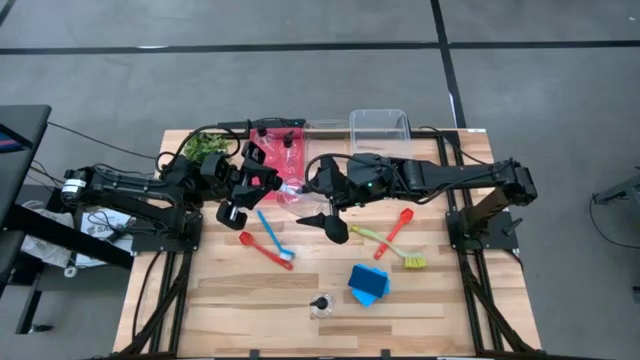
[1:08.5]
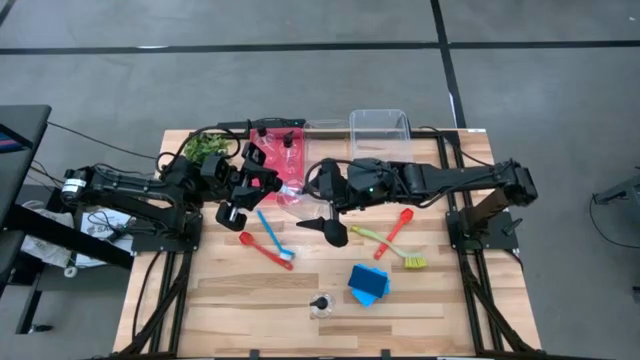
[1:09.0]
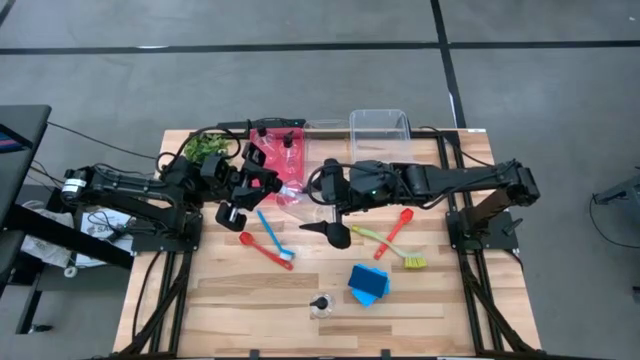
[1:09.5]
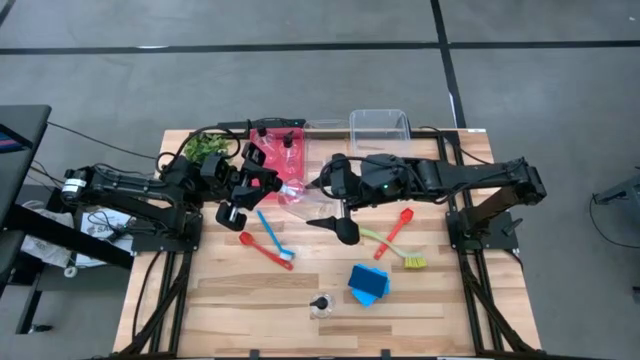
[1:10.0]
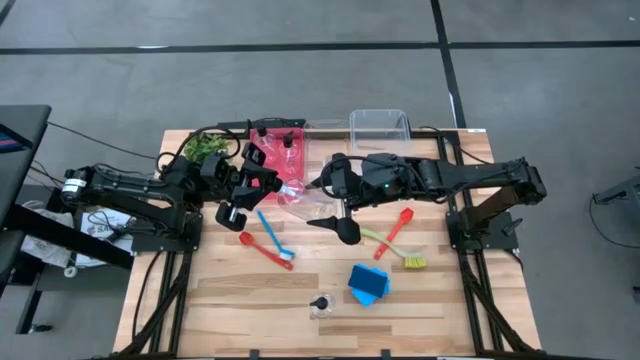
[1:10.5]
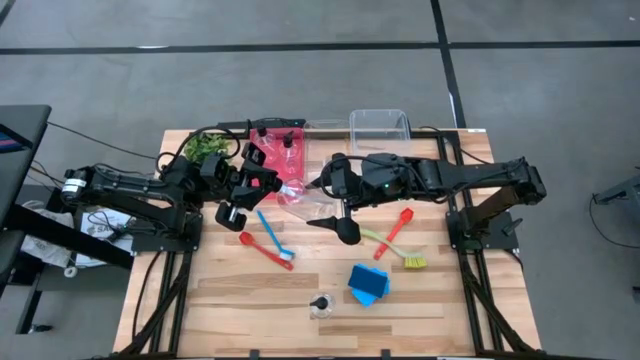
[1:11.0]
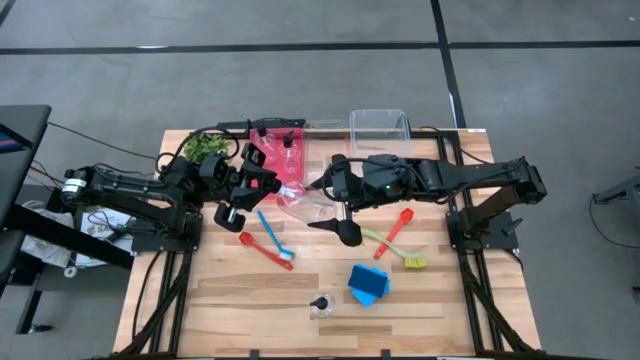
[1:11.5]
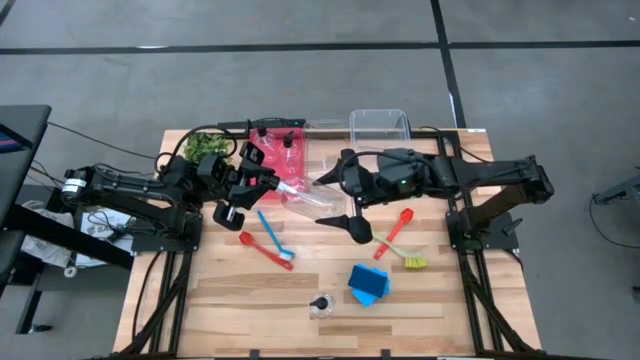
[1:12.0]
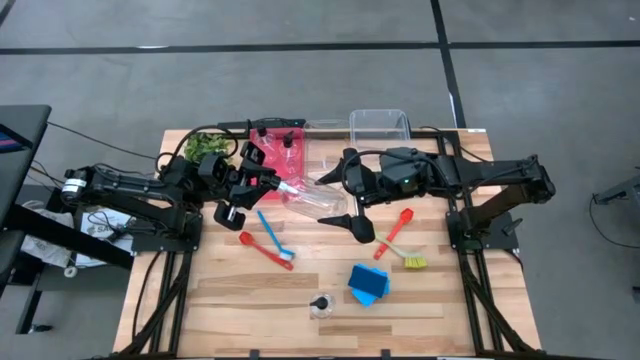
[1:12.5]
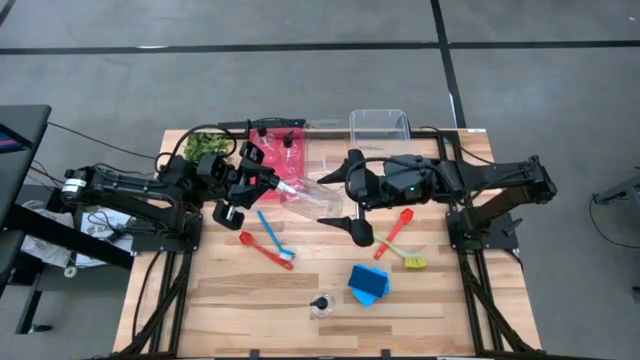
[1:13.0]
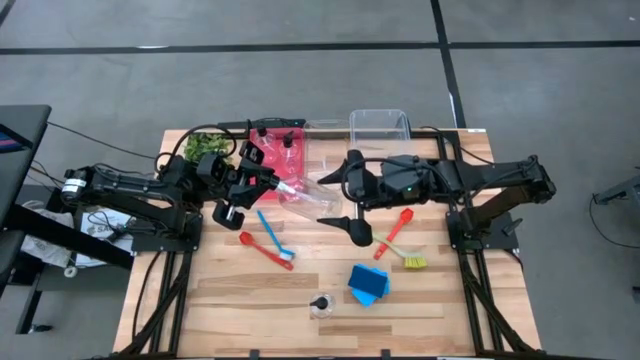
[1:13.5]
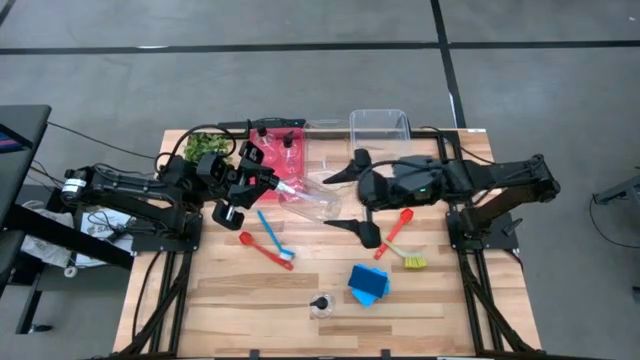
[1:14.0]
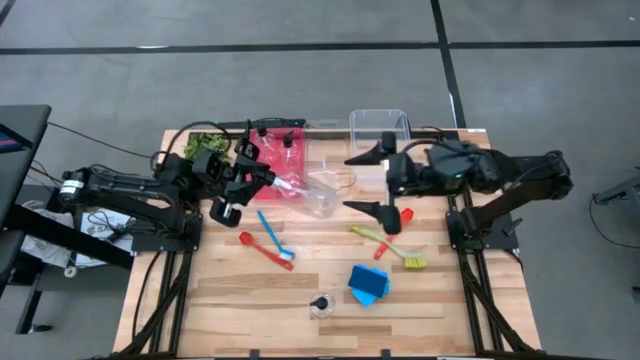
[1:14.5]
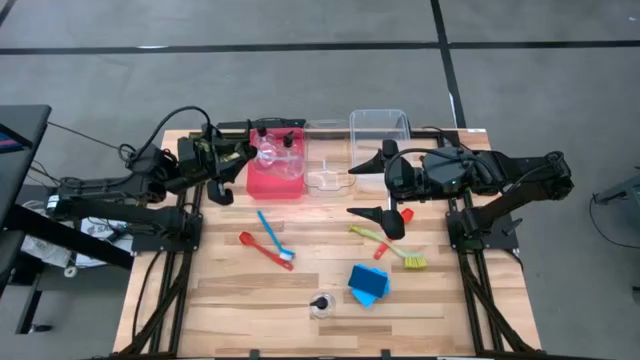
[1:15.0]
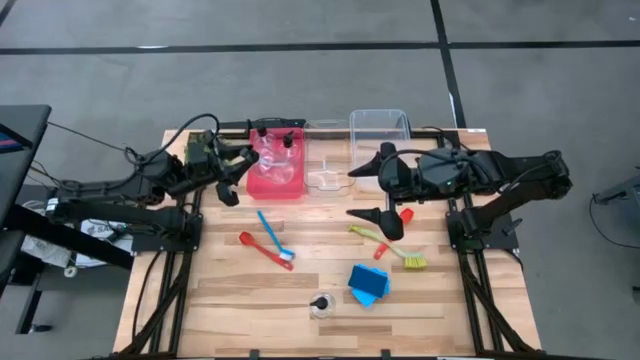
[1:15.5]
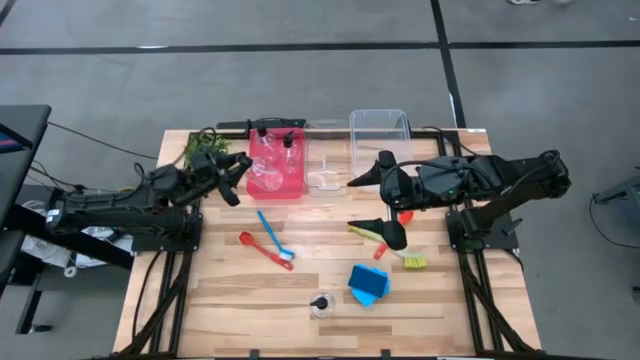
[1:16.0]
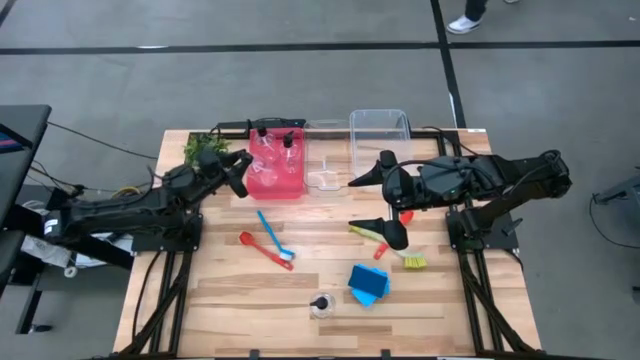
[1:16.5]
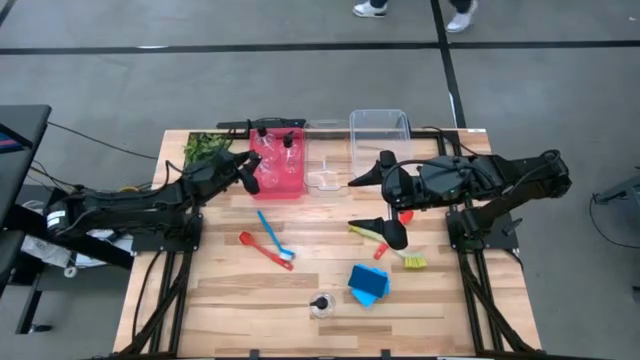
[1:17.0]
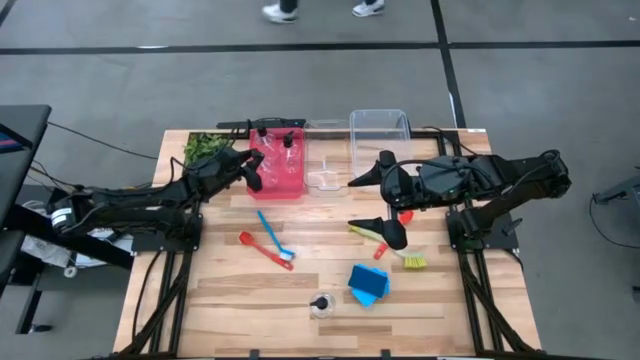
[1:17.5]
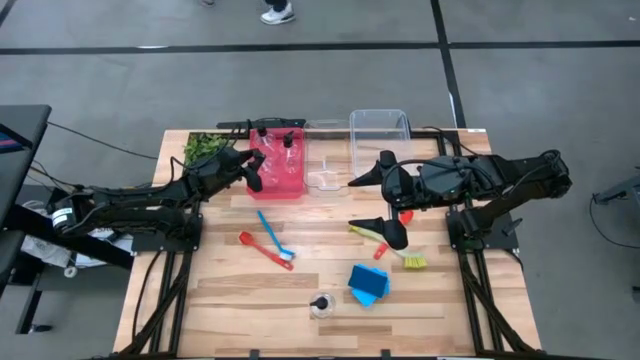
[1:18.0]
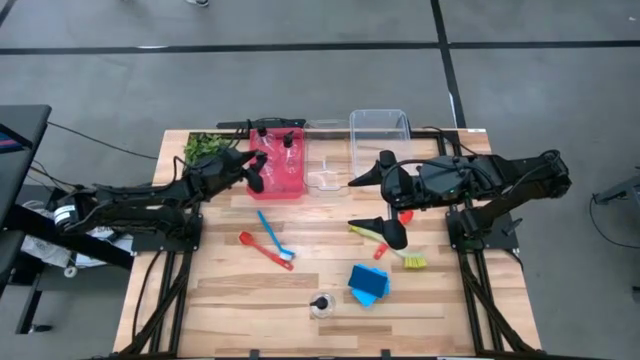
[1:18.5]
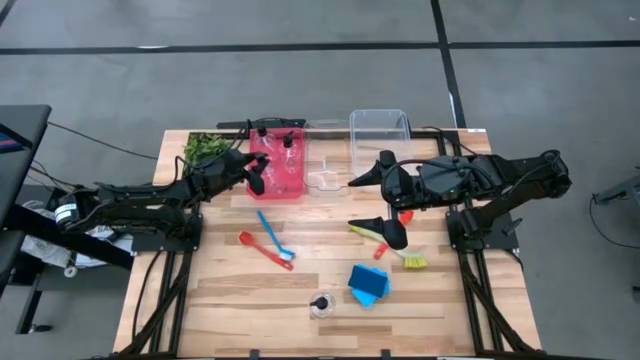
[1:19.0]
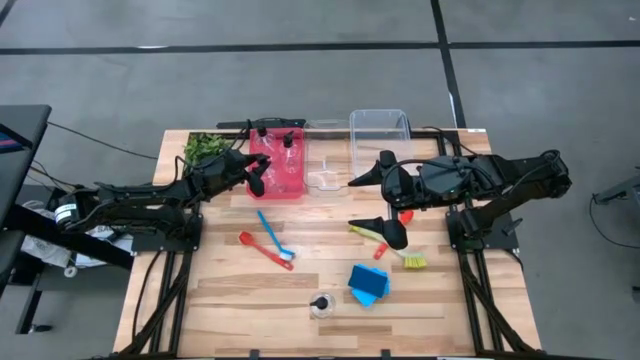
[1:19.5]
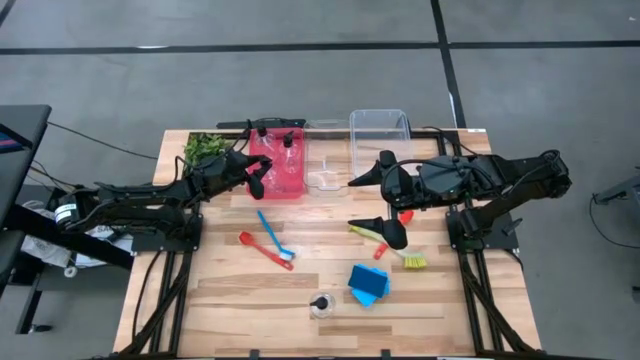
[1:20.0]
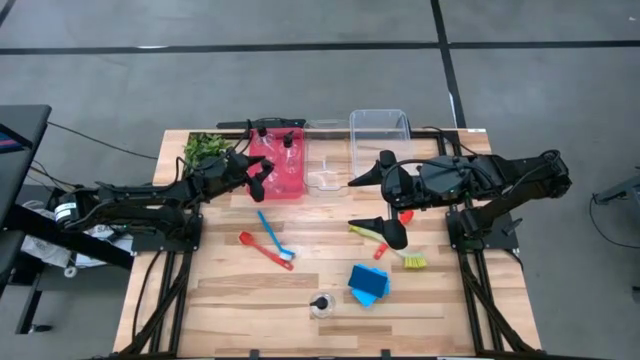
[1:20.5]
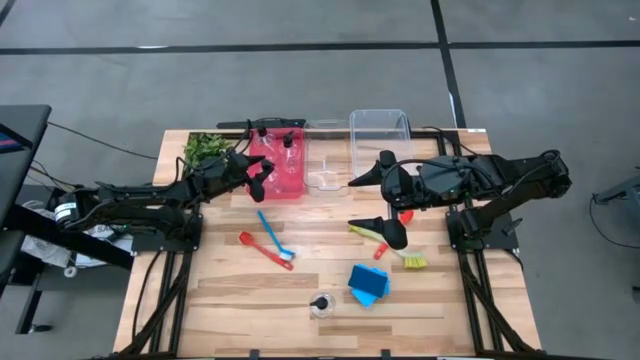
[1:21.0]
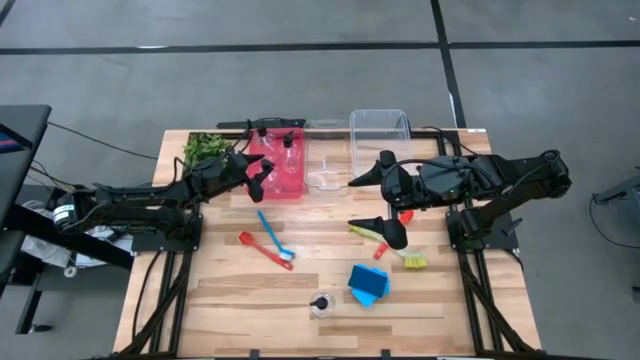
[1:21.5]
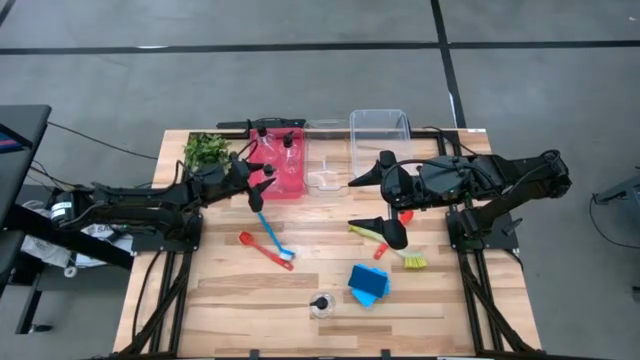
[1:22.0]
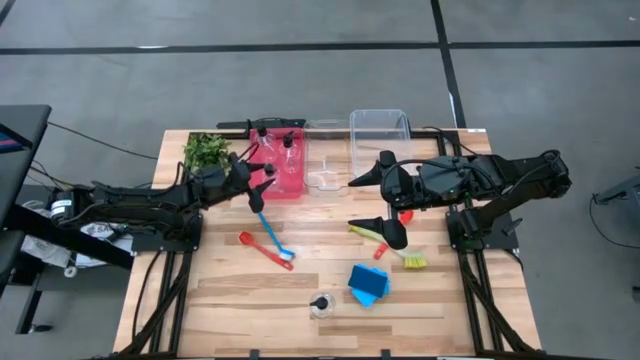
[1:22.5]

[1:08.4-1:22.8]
Task: Pick & Place Kitchen Sink Supplies
Put the spray bottle into the pink bin

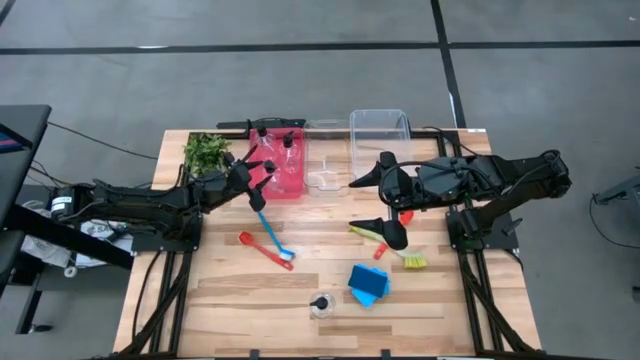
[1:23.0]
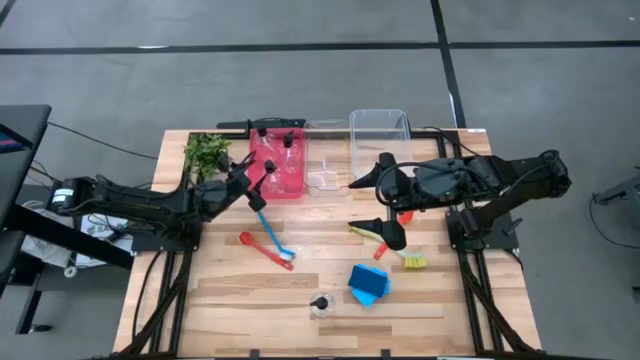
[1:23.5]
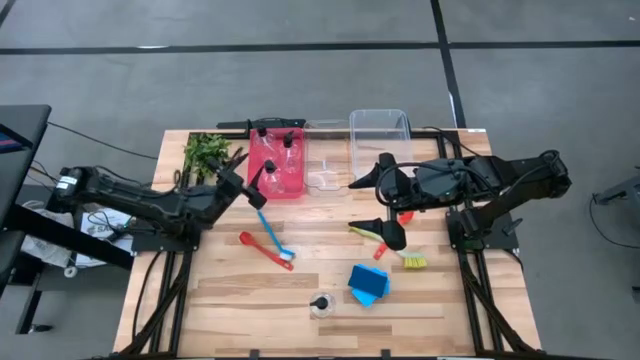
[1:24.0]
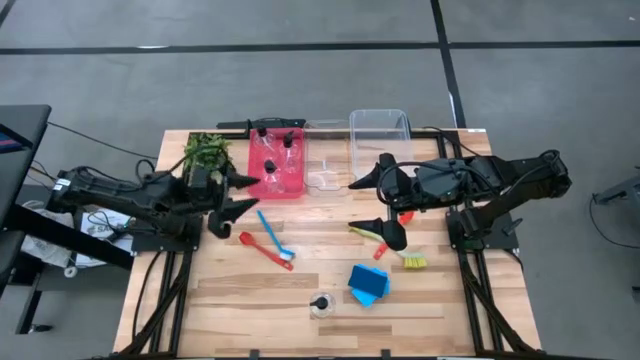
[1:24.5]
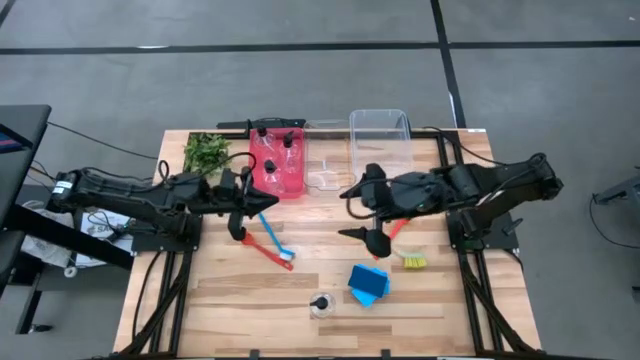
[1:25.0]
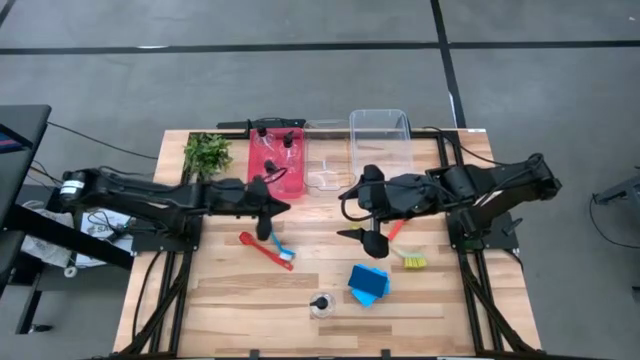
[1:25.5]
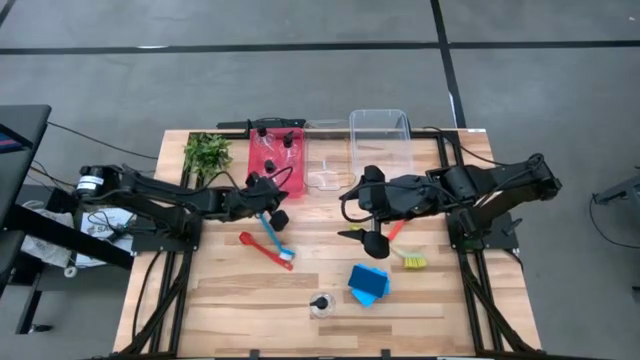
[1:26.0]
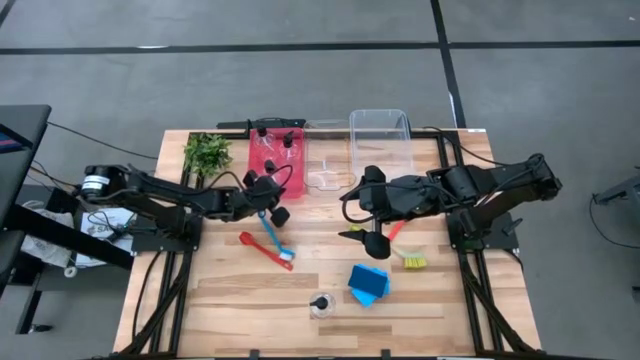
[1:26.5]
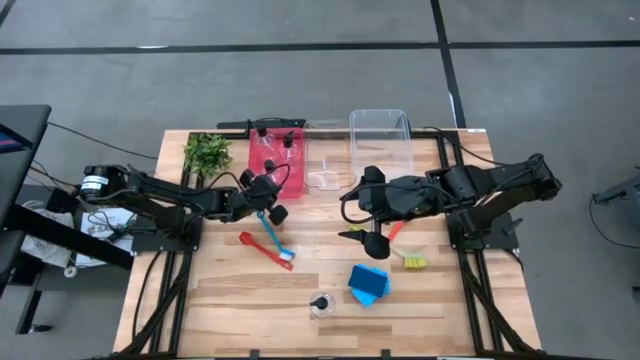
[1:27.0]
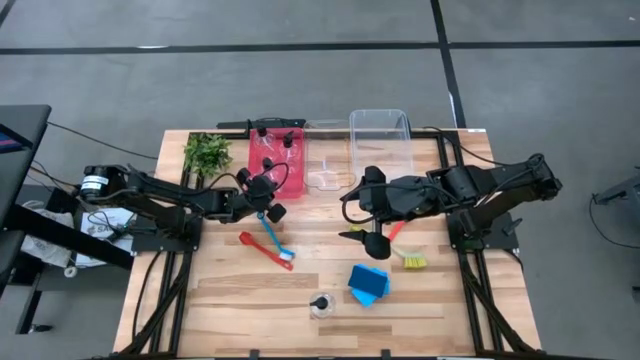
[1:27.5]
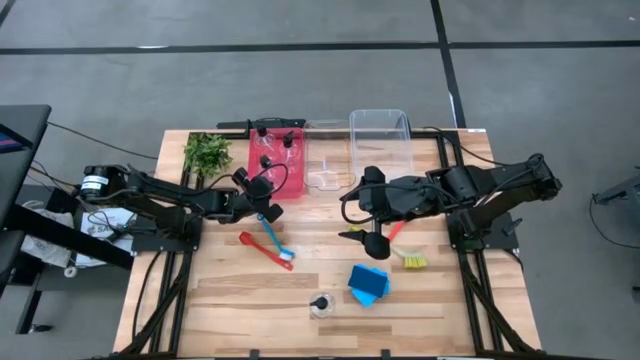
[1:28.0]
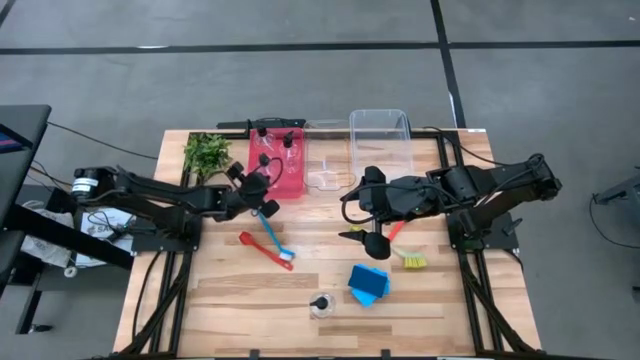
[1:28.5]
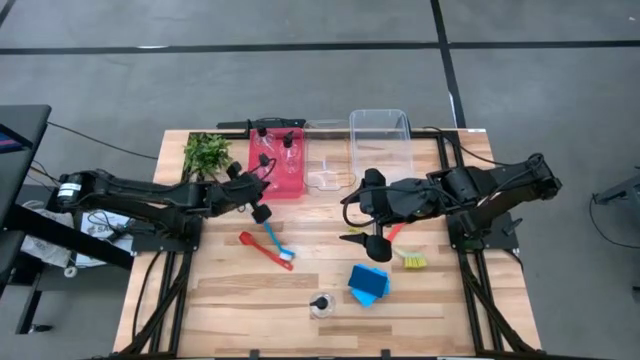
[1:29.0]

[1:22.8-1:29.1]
Adjust the spray bottle on the pink bin
